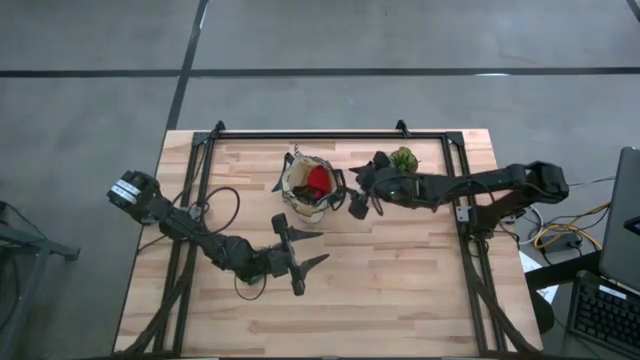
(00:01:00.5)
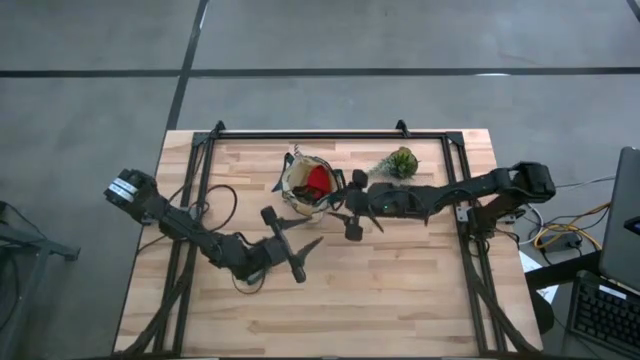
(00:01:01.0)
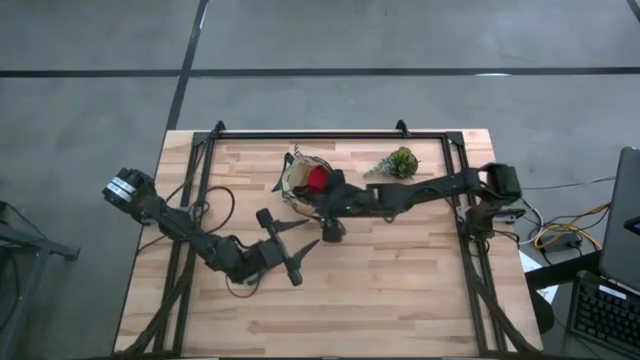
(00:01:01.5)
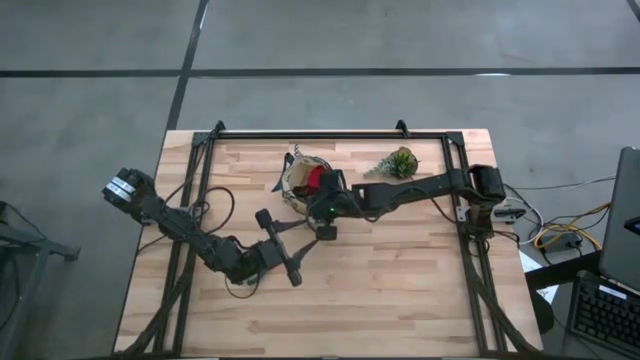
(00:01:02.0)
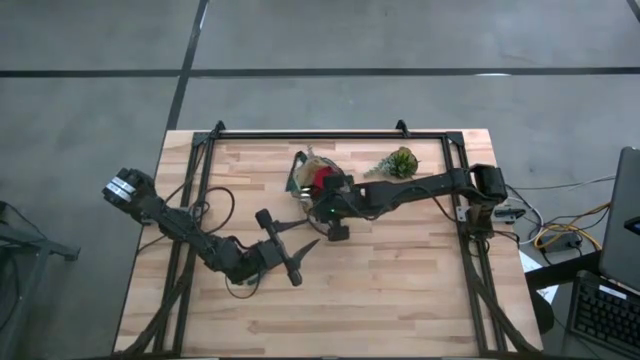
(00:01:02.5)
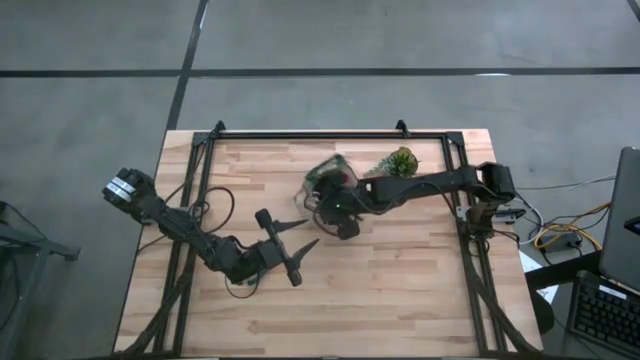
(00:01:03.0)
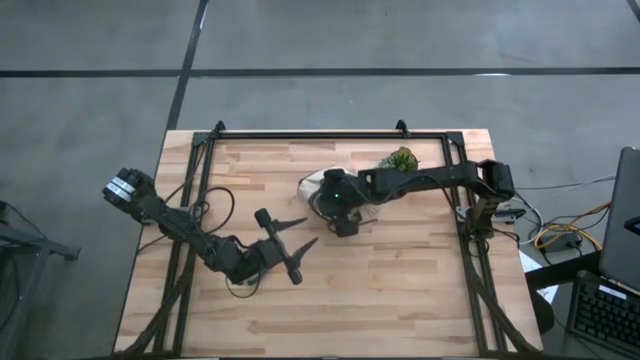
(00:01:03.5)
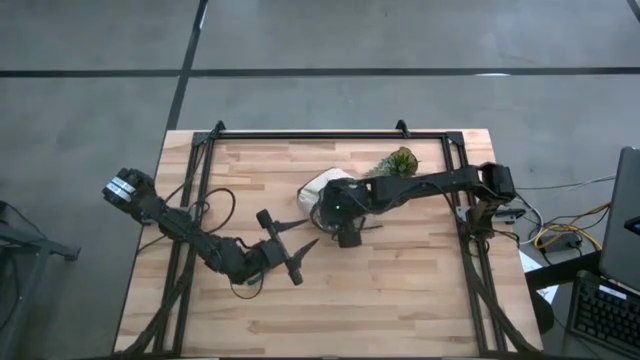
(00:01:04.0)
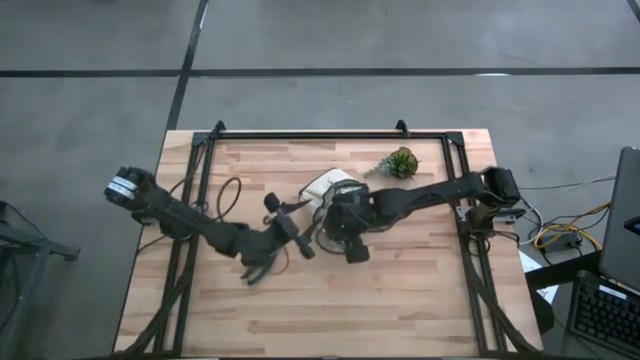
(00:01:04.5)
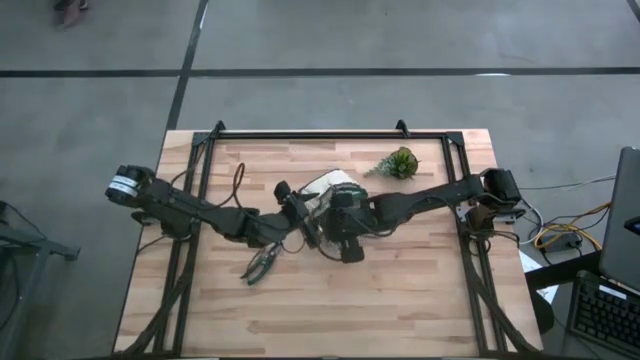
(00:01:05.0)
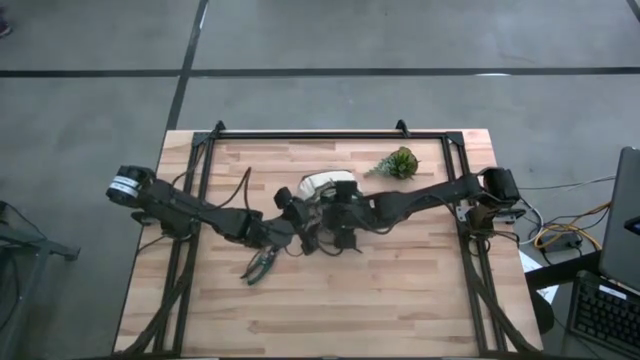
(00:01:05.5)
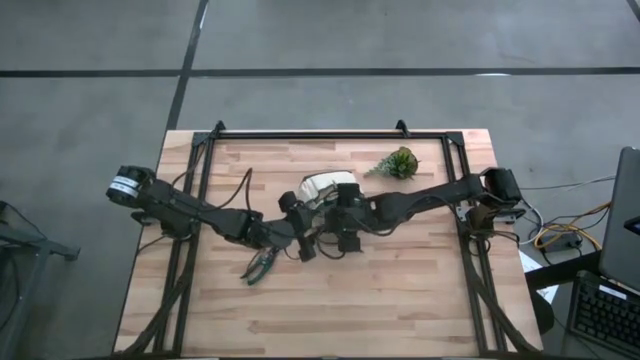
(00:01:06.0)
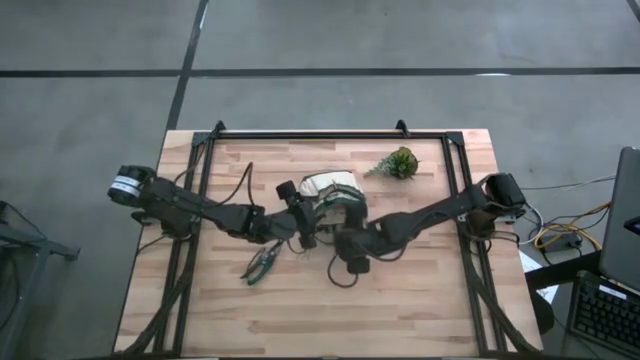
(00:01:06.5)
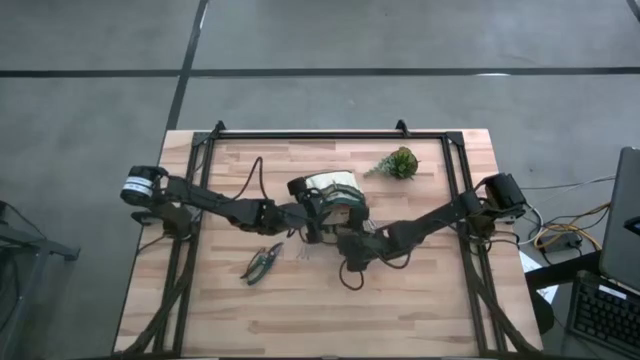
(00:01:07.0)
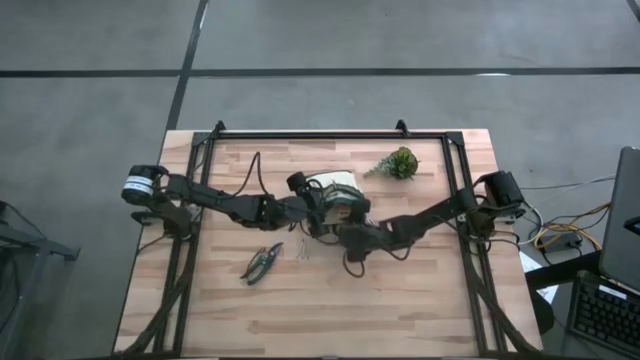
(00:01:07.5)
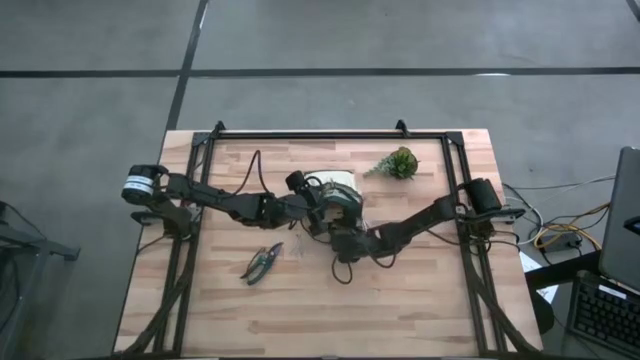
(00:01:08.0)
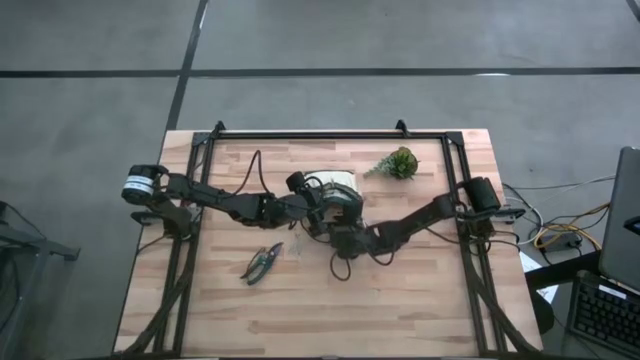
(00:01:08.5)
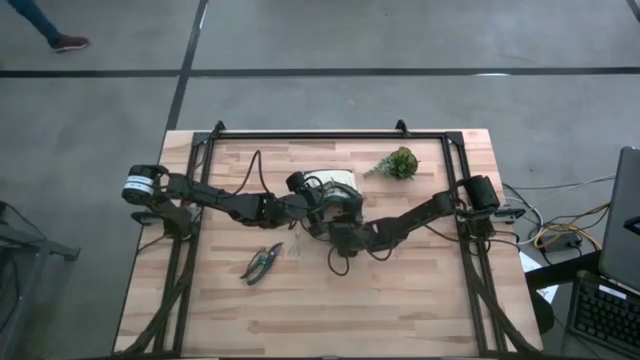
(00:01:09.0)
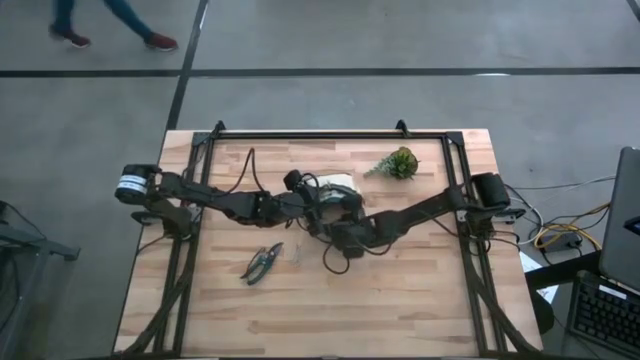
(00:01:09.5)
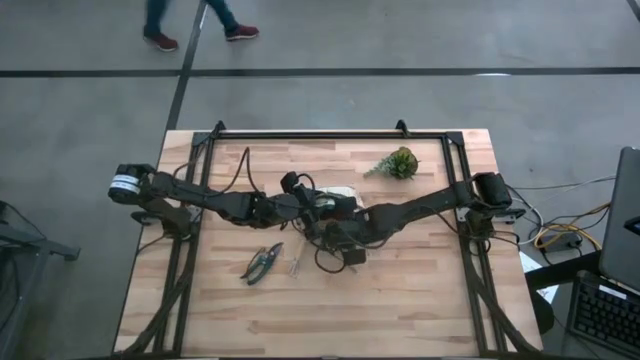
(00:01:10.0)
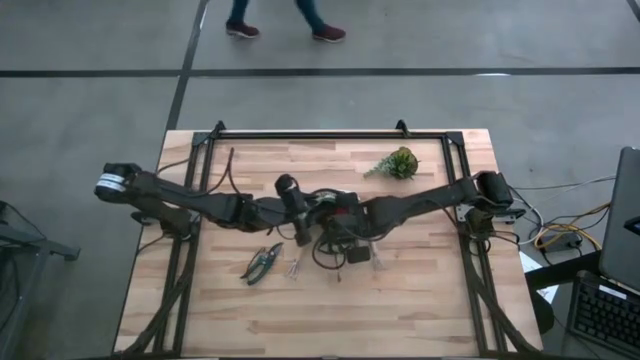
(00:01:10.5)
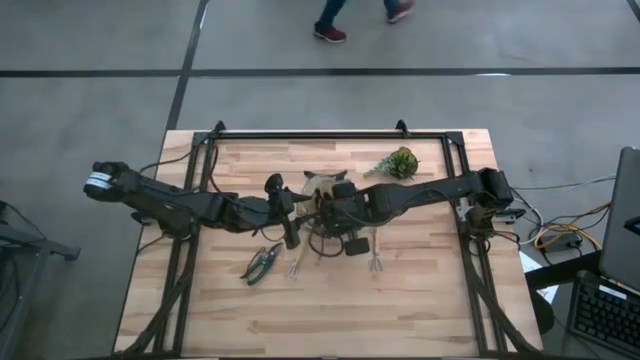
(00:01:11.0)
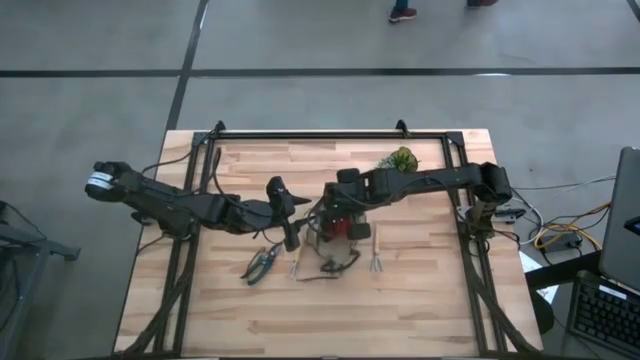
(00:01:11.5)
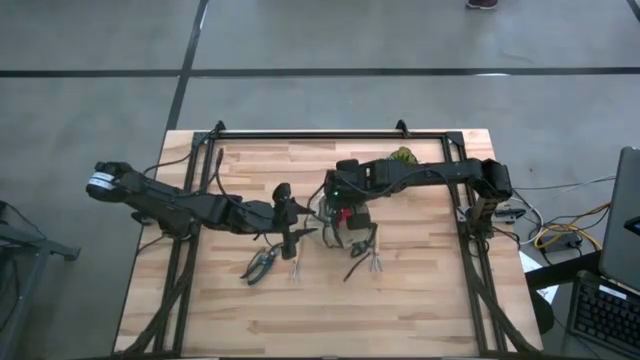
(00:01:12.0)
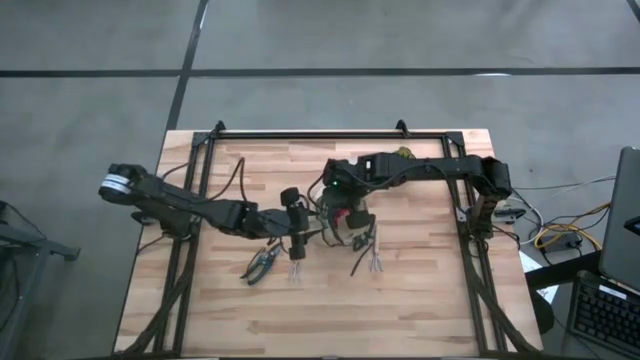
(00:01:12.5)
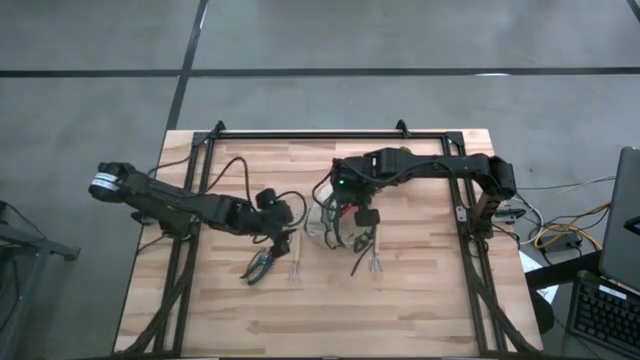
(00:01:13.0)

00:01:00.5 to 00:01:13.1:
Task: Pick & Place Garden tools in Gardening bag
Adjust the gardening bag
